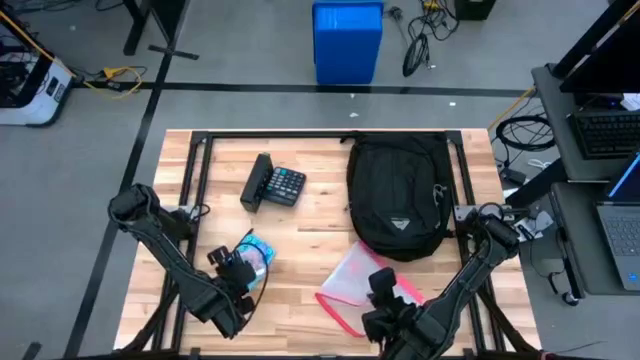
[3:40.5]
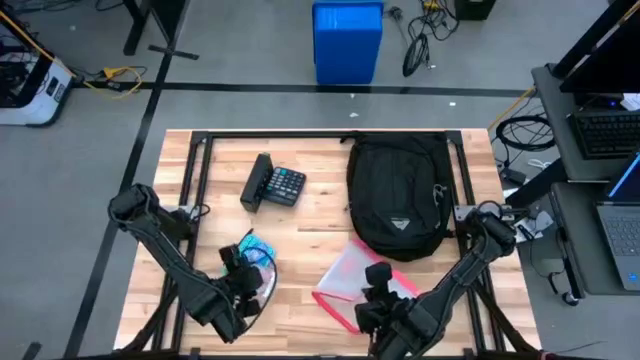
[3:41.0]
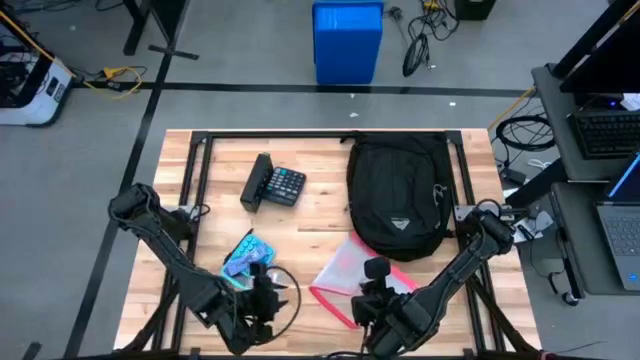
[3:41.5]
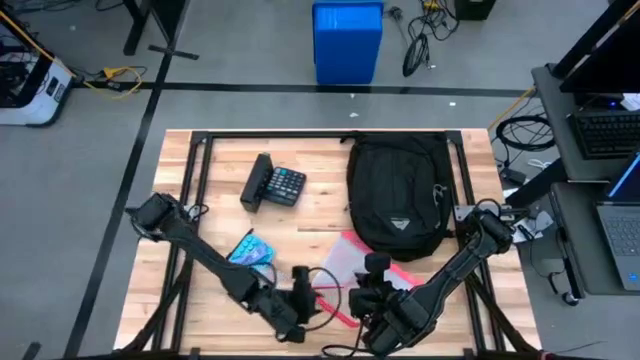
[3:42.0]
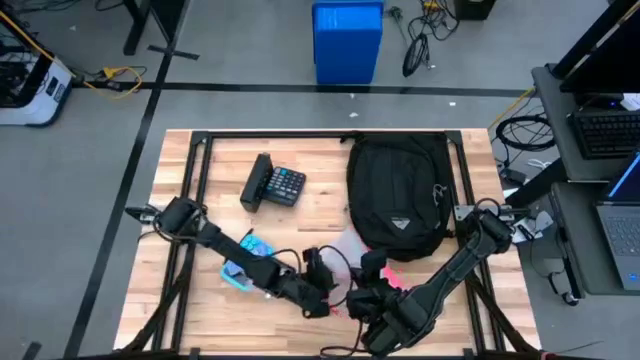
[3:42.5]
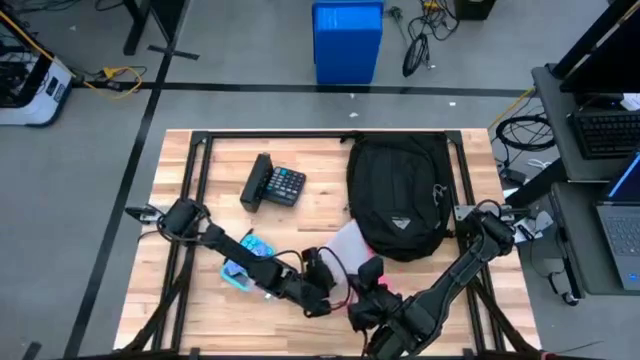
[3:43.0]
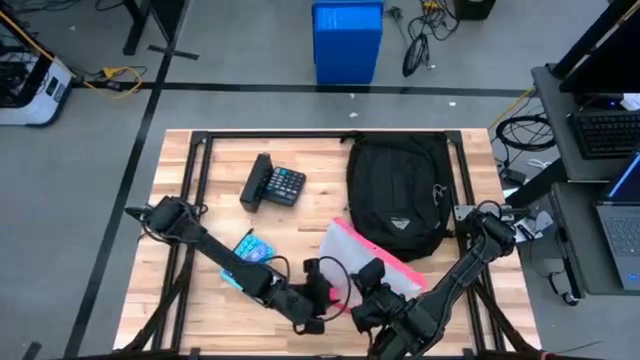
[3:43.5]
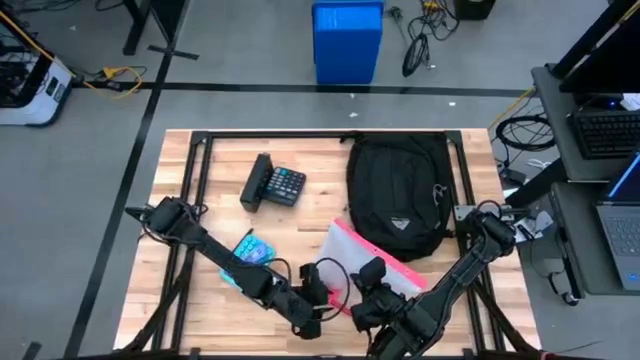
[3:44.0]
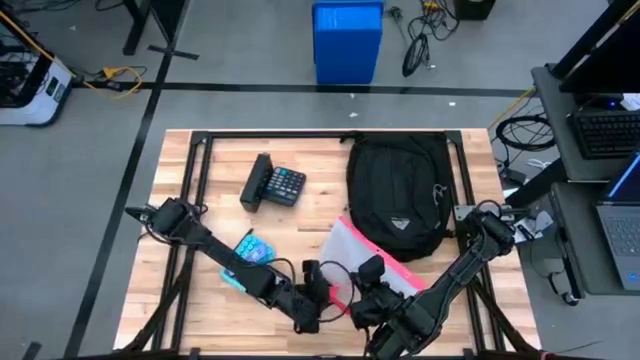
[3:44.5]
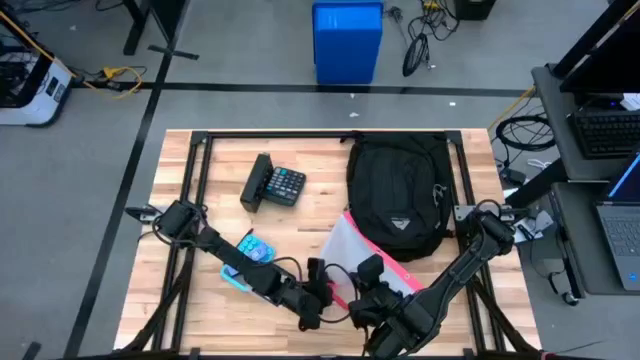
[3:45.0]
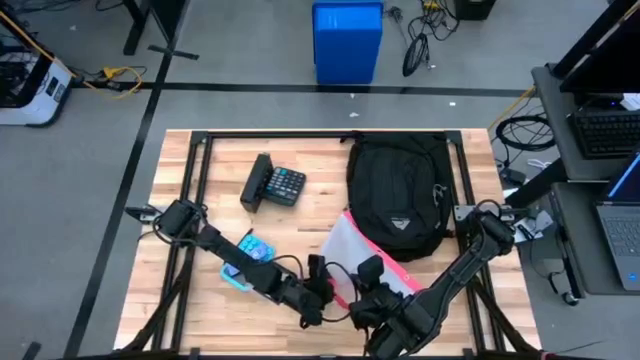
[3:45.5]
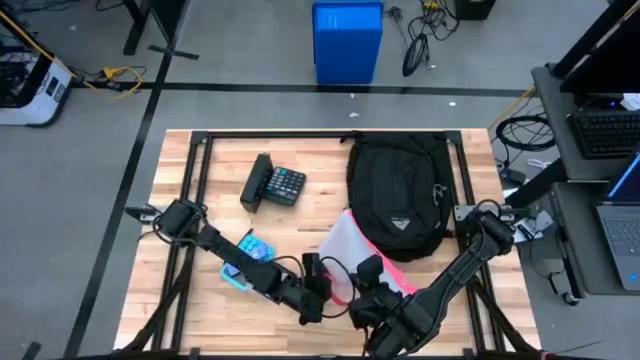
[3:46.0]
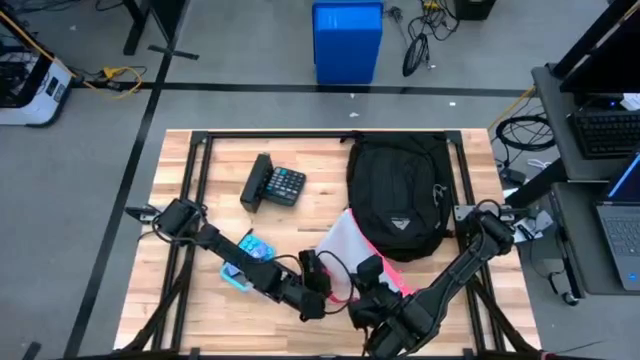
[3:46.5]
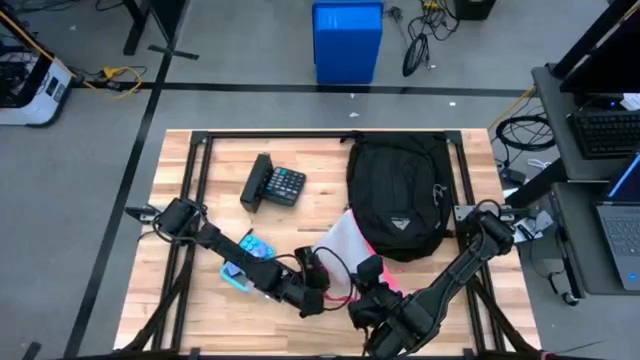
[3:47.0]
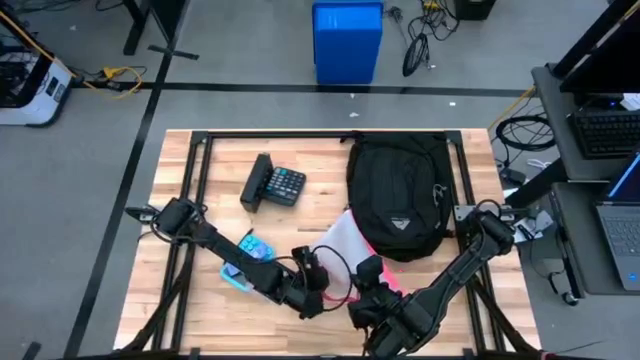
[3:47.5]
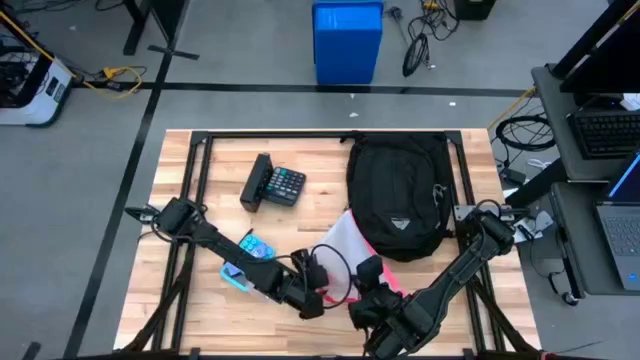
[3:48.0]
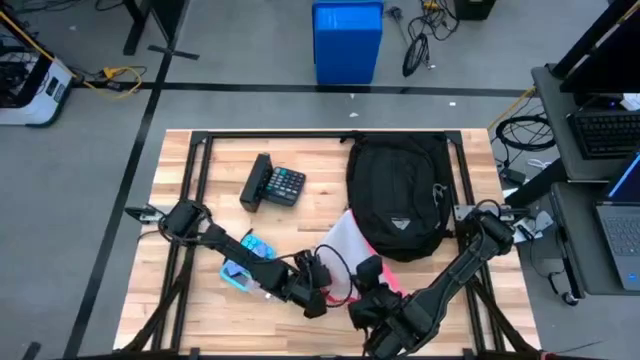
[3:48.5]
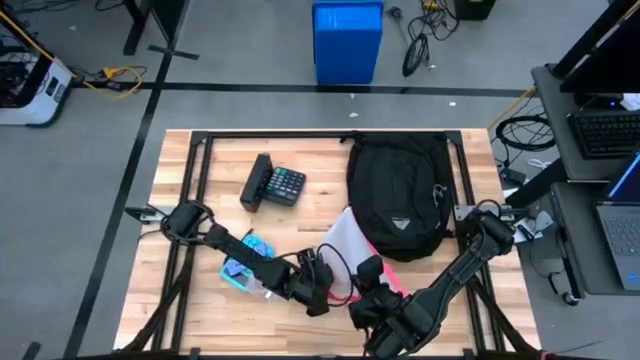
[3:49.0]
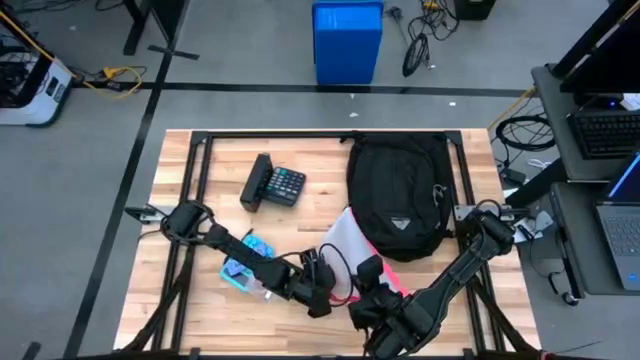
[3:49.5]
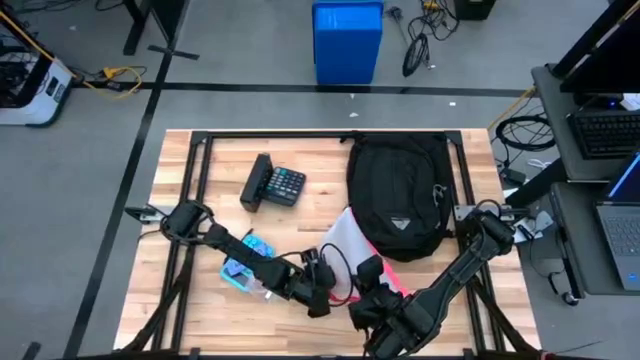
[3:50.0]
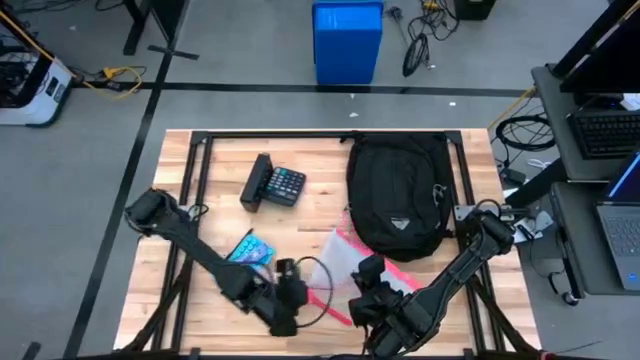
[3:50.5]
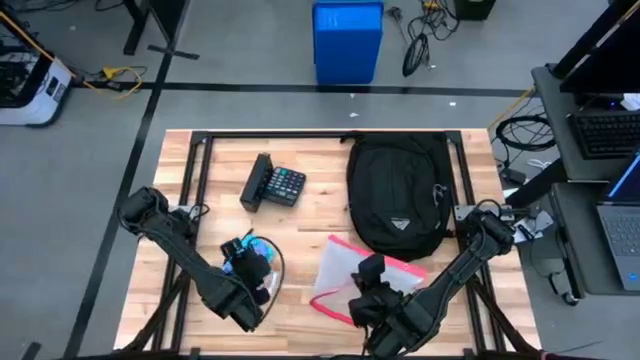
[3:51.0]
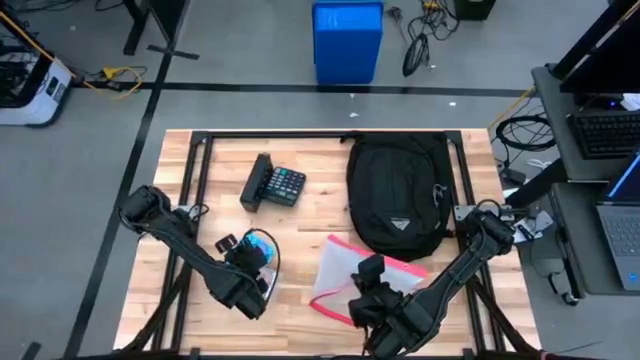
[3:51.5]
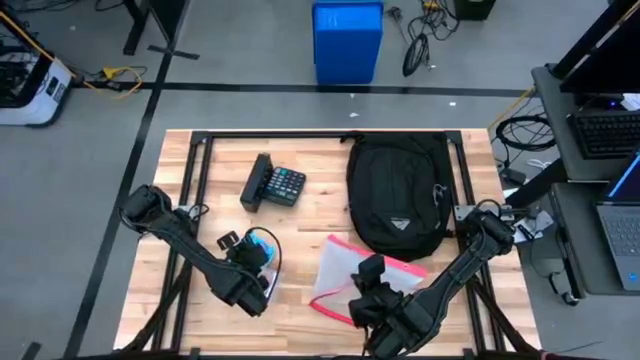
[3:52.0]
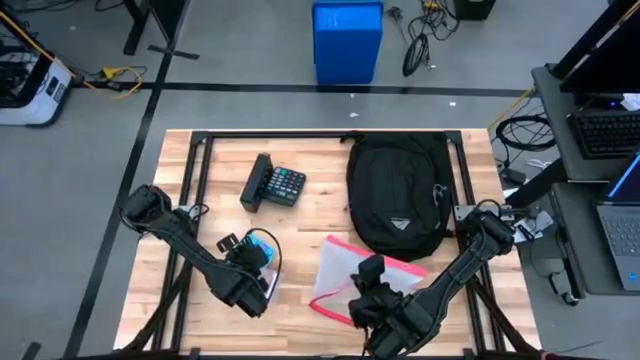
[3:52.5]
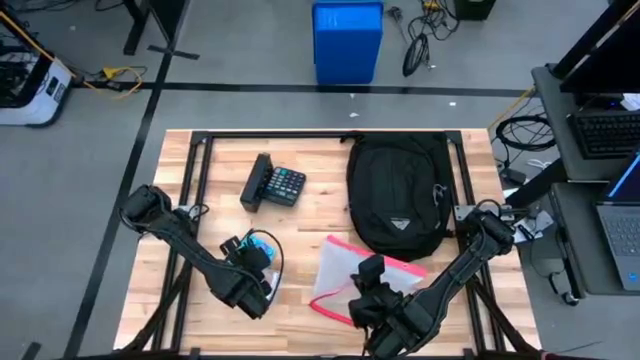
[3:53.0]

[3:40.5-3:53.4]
Task: Unpack backpack
Remove the pink charger adapter from the white zip bag

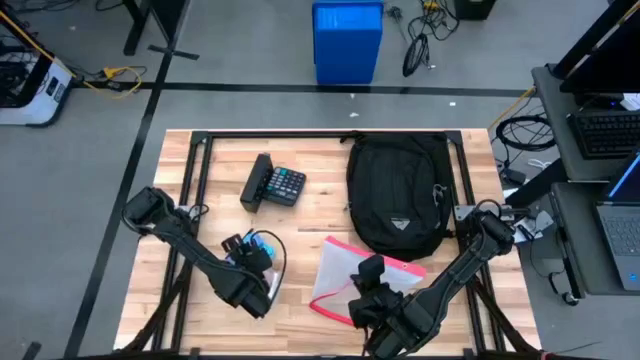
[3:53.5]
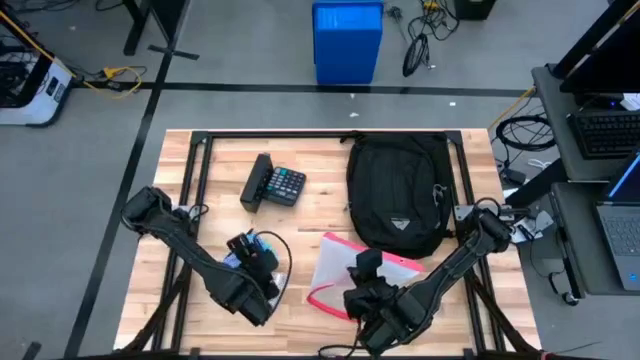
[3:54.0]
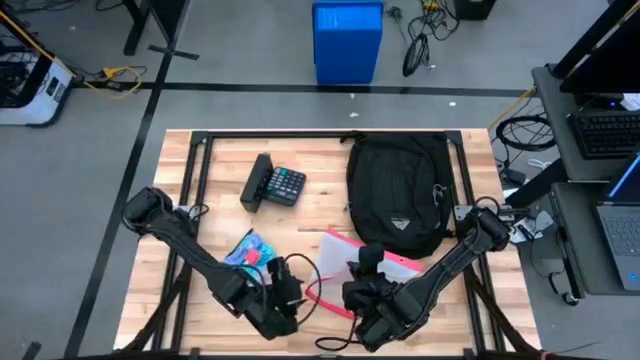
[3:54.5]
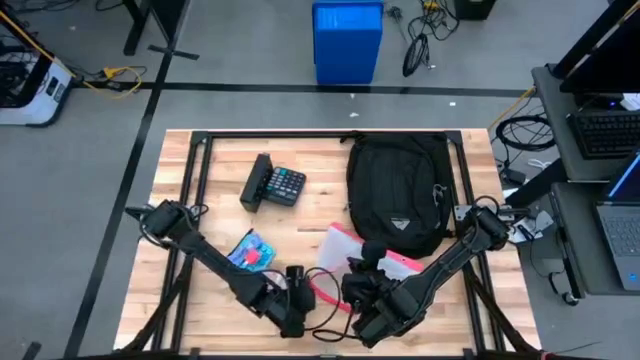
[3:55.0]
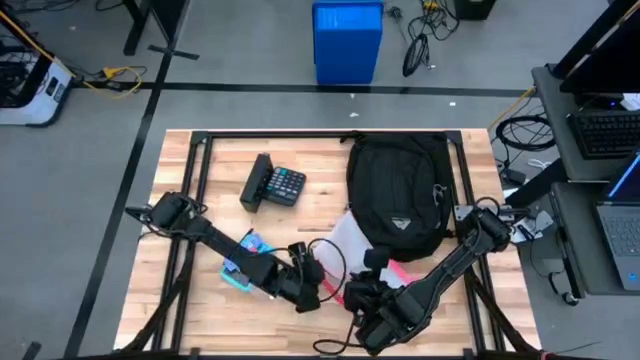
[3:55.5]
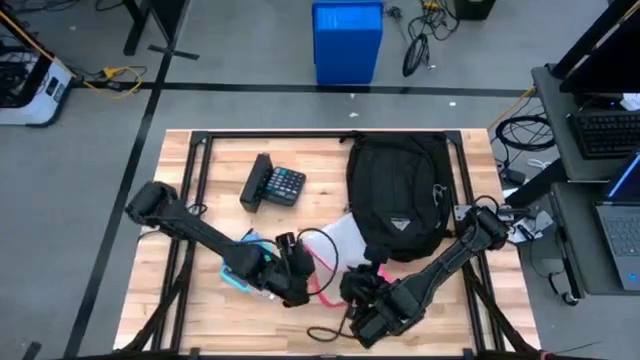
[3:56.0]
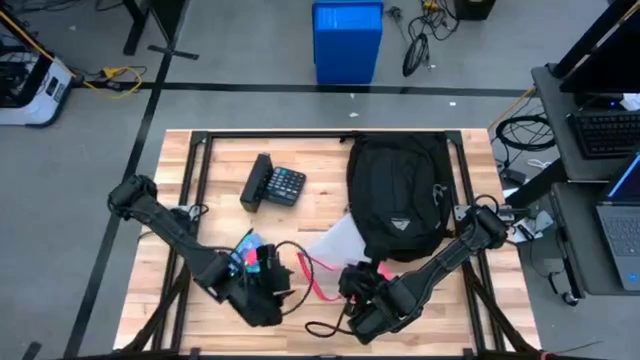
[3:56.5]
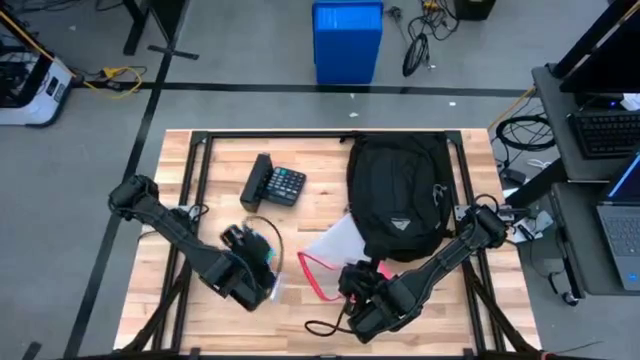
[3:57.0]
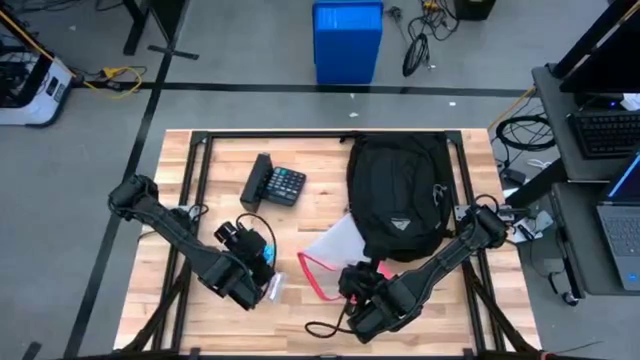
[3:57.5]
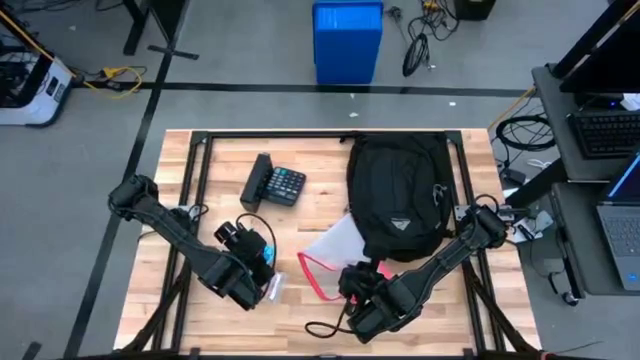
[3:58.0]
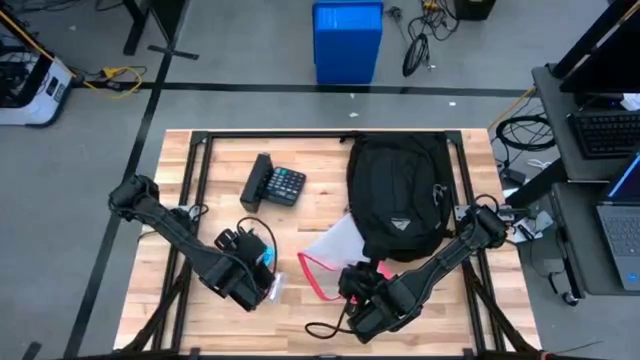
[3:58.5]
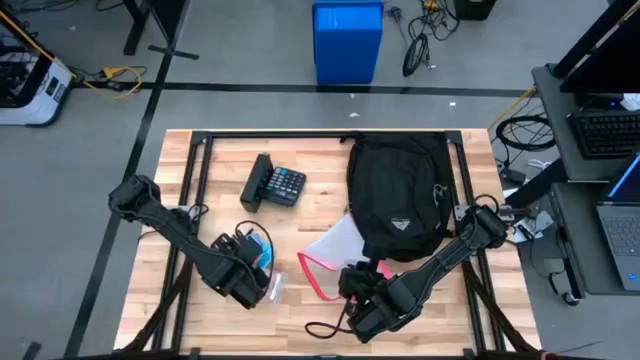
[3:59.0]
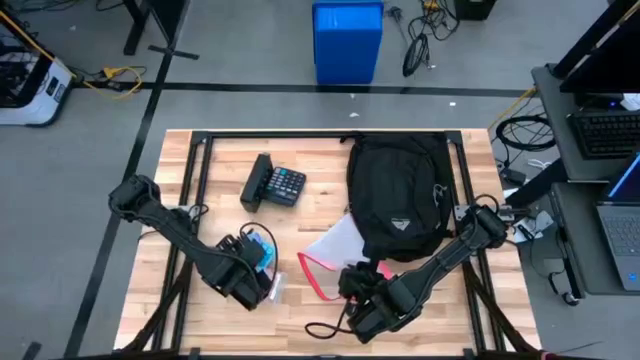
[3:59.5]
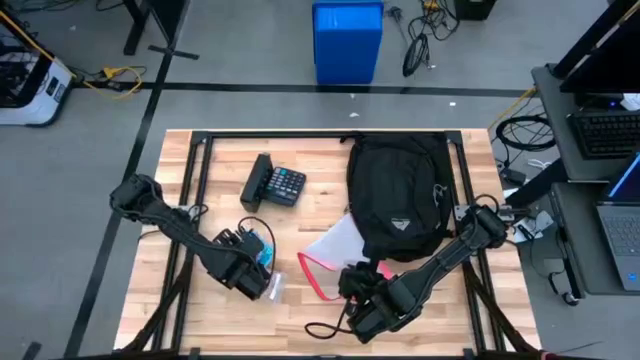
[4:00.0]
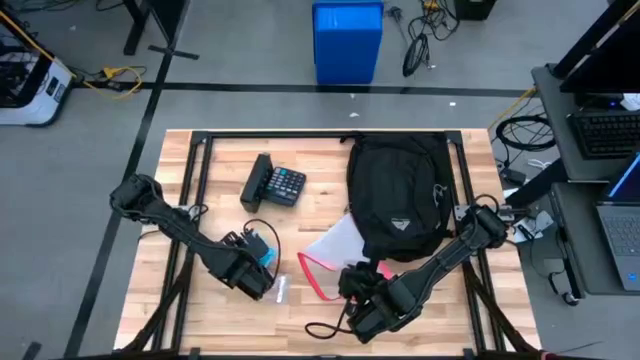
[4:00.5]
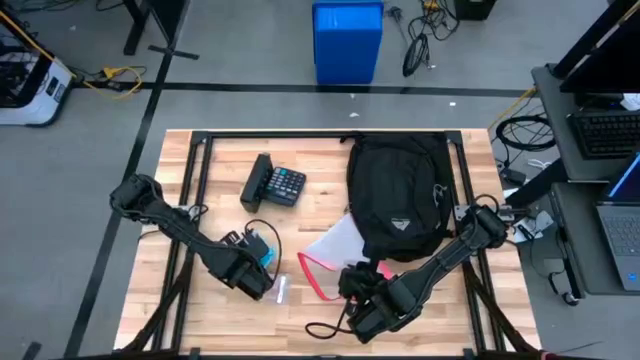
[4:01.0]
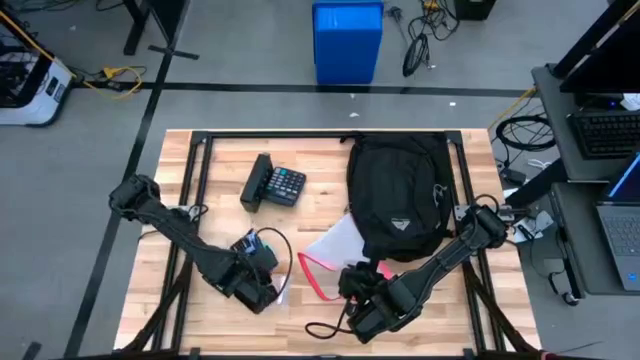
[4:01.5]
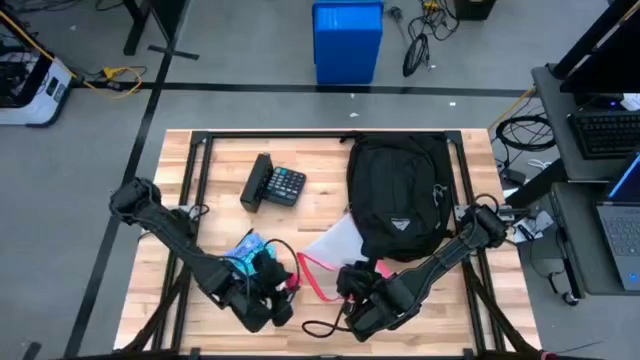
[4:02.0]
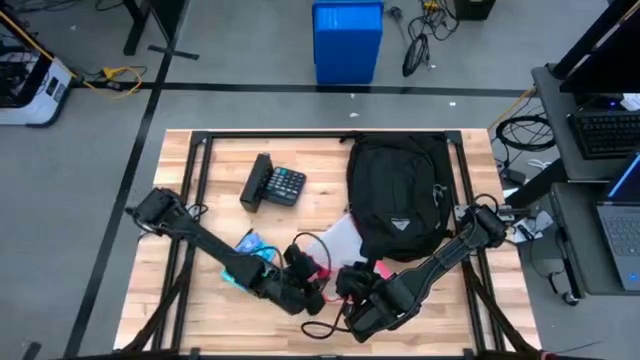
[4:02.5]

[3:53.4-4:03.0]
Put the pink charger adapter into the white zip bag
